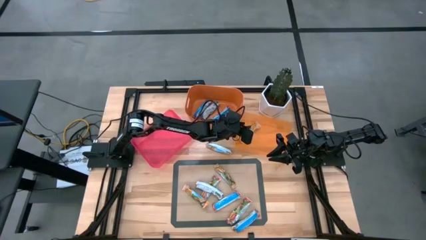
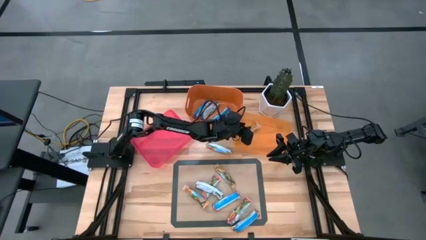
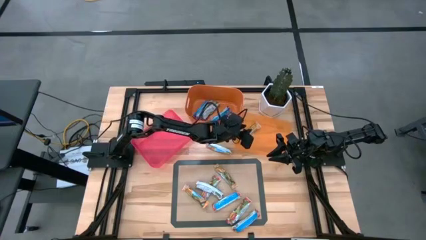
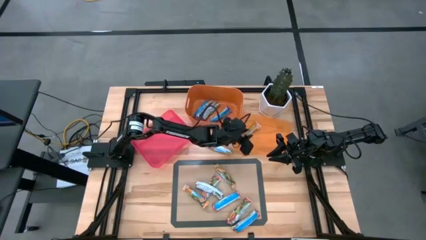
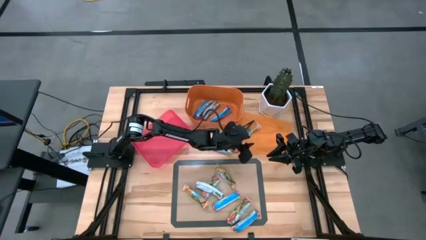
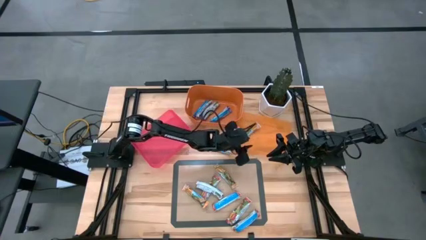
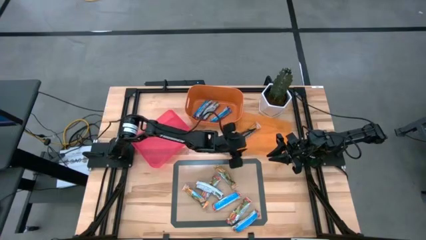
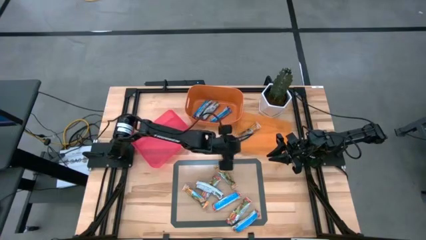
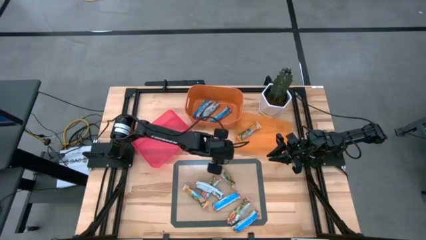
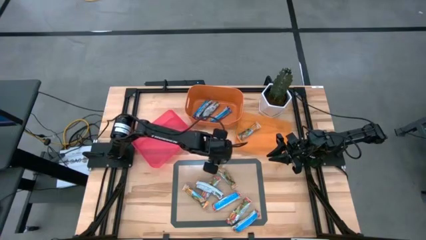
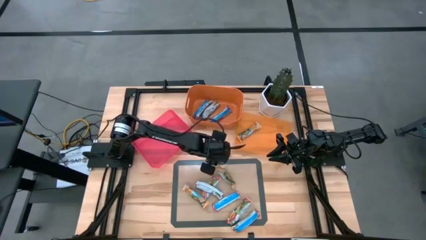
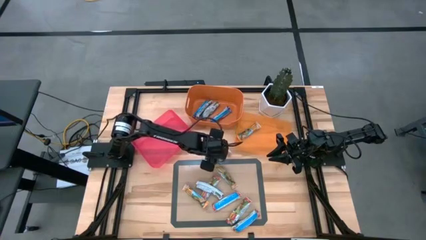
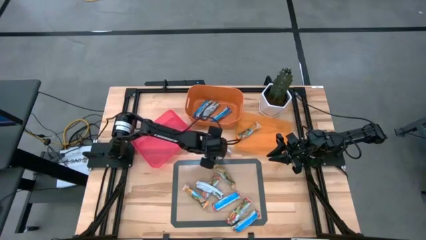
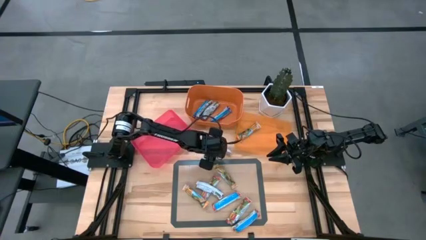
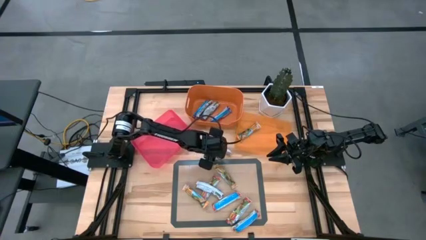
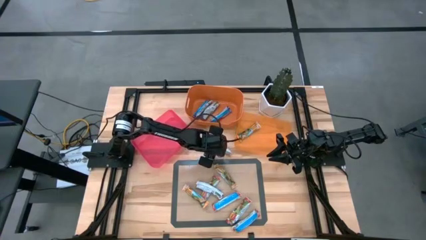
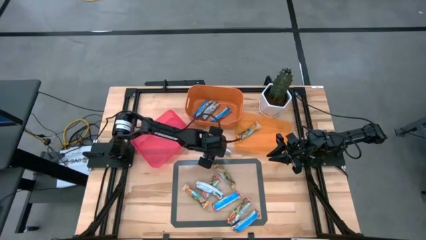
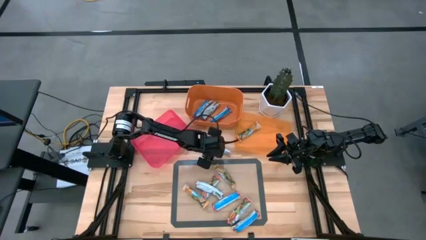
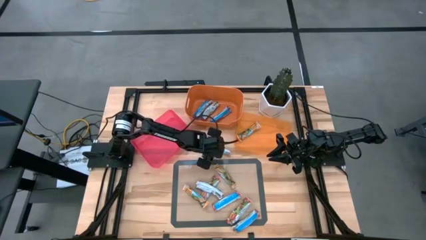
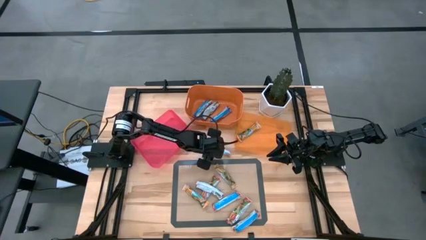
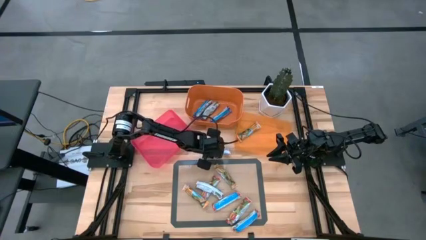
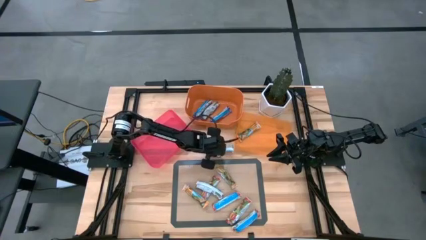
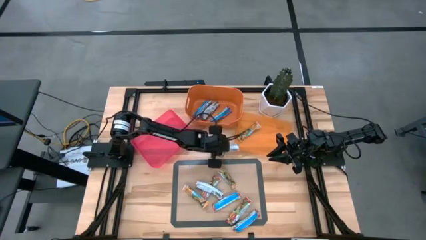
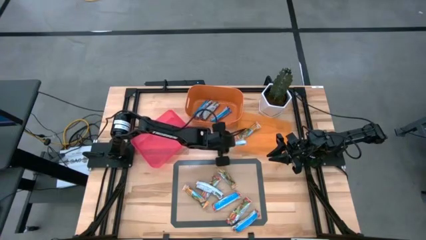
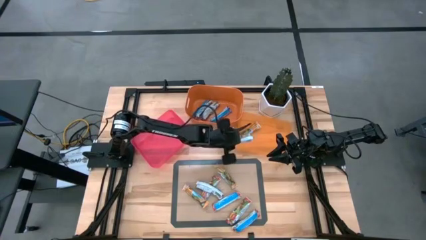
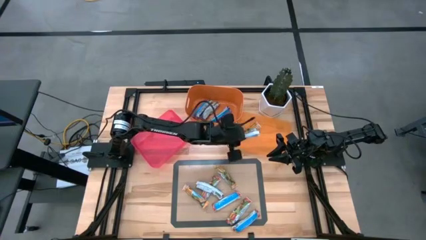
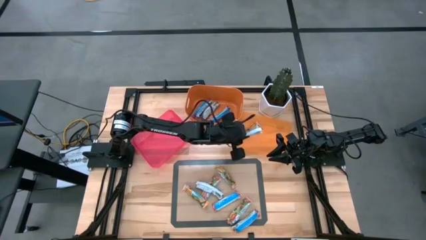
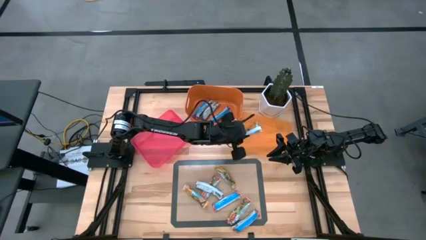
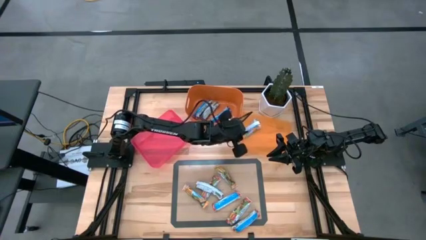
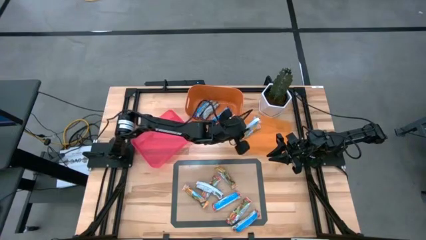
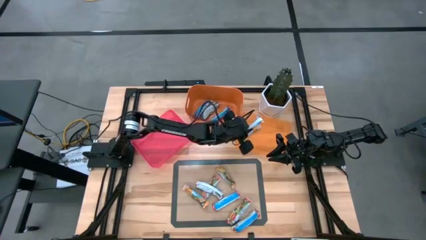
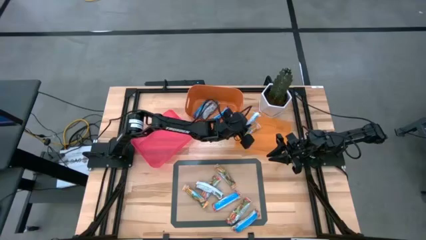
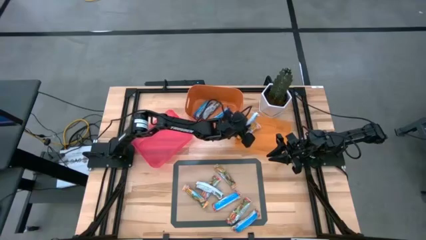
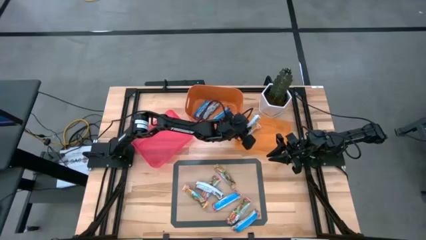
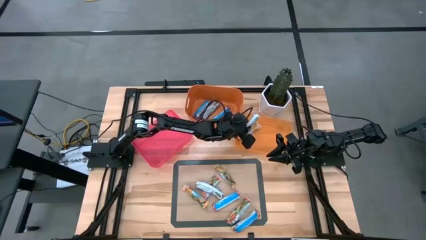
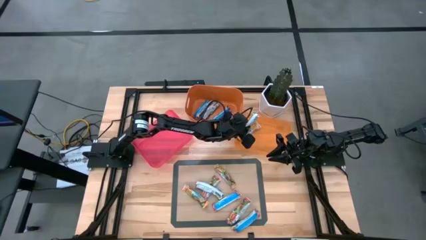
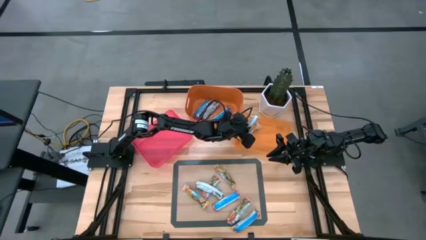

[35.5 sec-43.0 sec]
Task: Pick and place Granola Bars by type
Put the yellow granola bar into the light orange bin

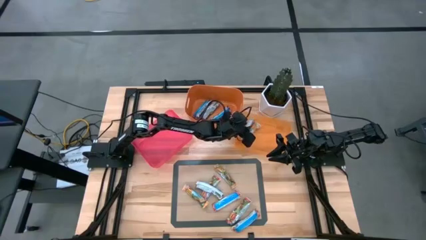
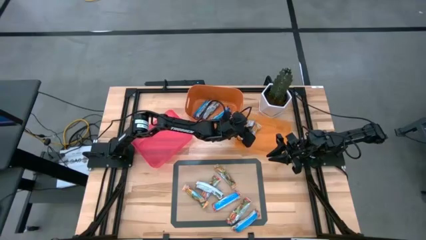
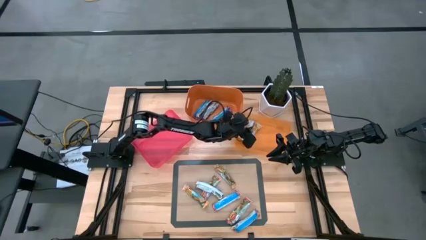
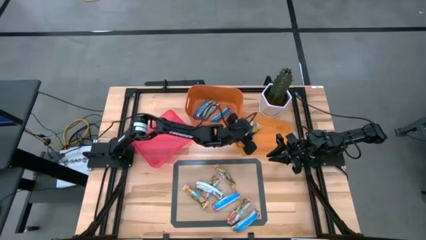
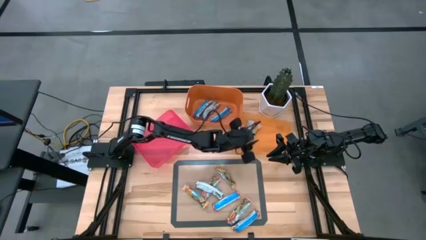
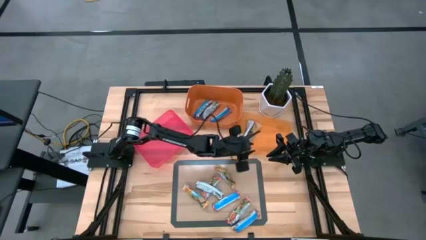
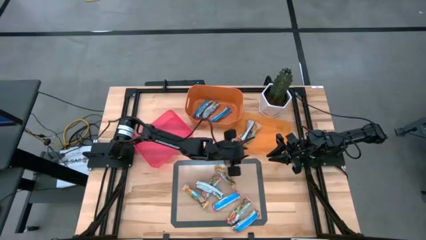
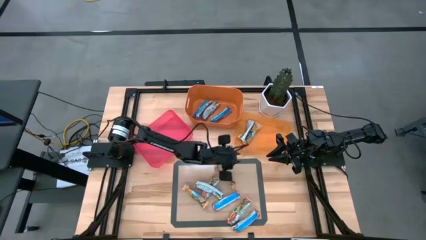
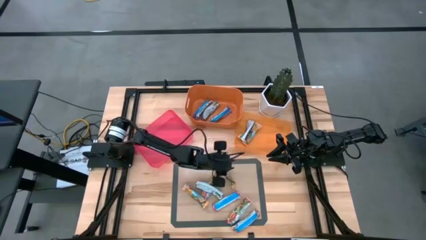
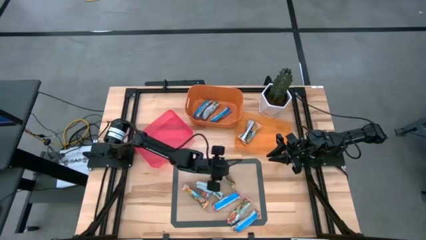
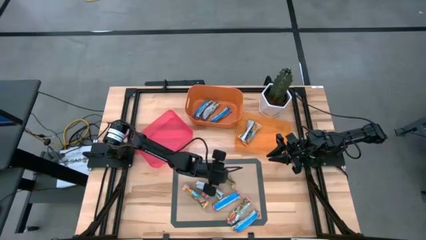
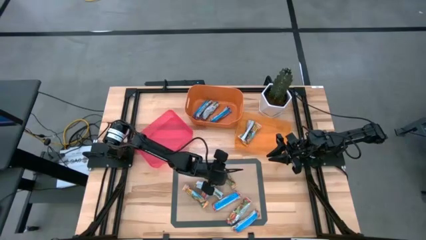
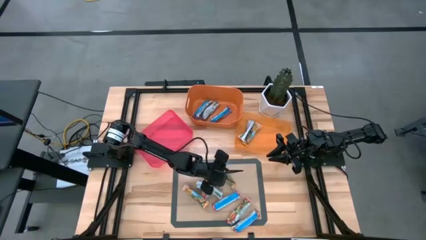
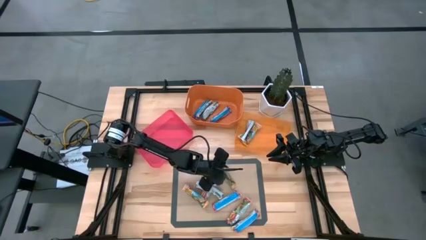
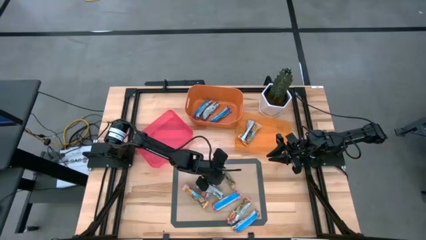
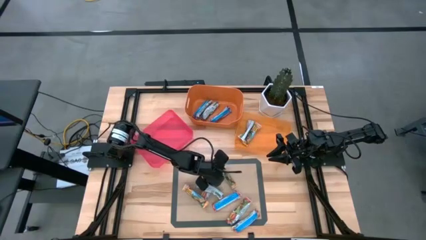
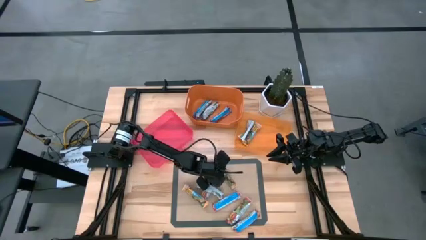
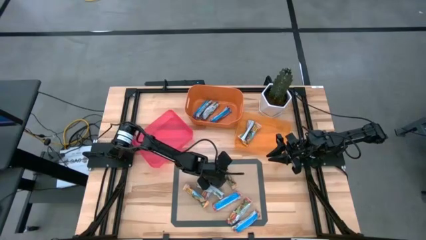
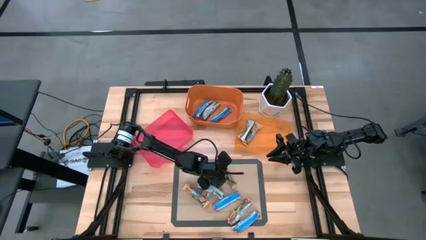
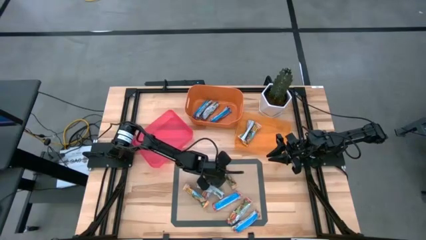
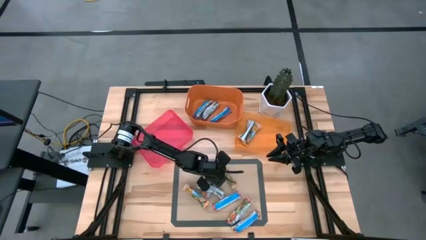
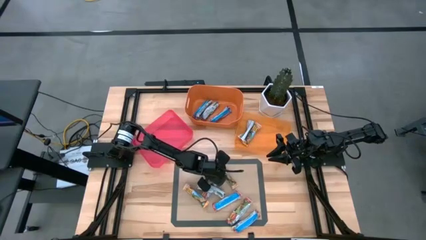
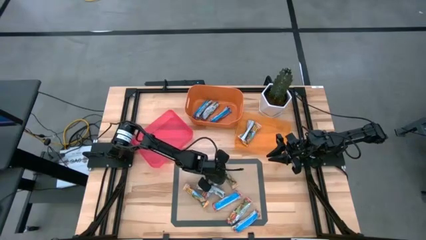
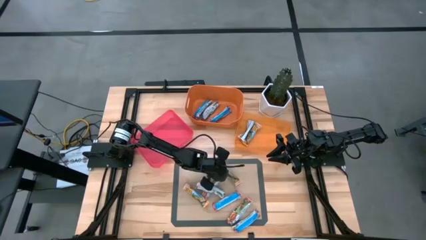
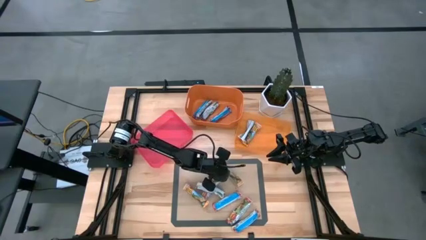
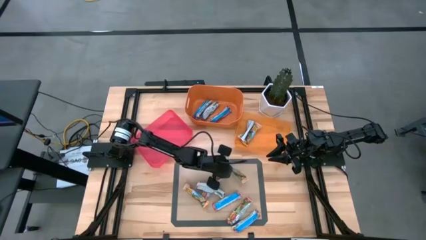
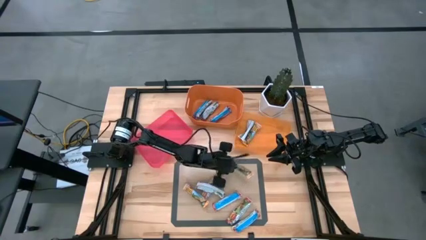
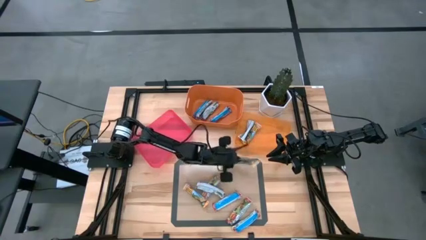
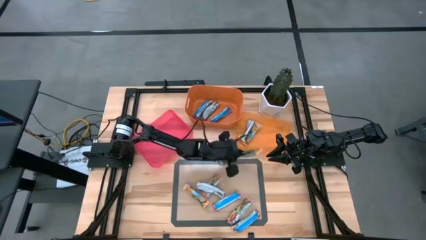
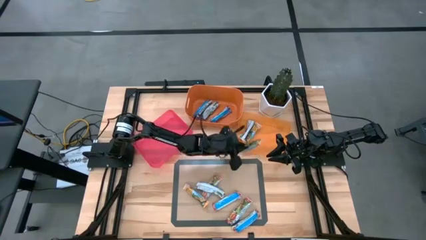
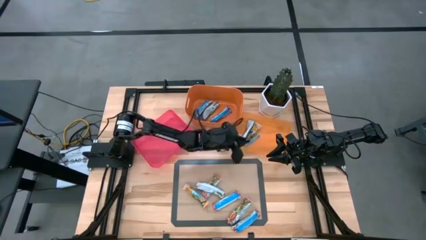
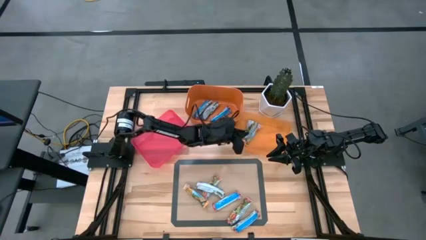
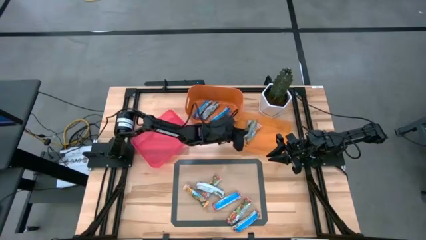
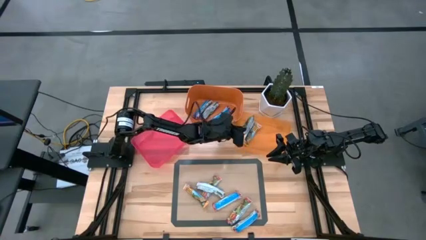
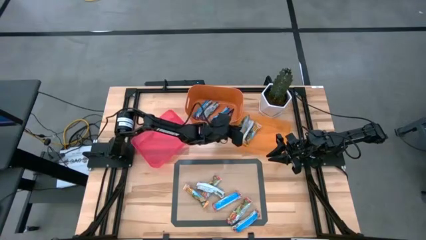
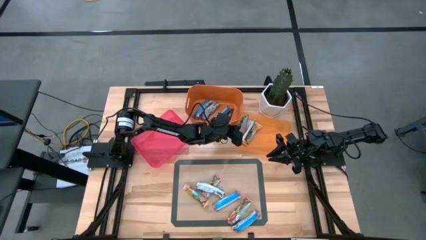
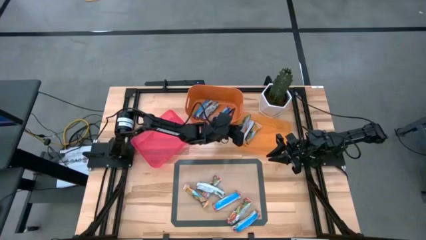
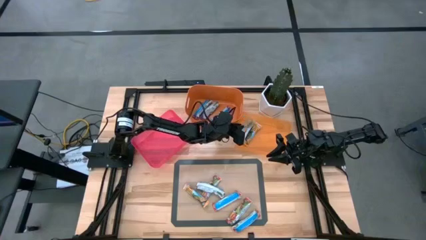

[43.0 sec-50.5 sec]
Put the top yellow granola bar into the light orange bin

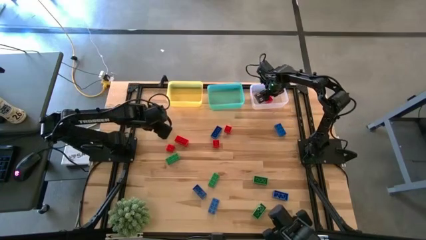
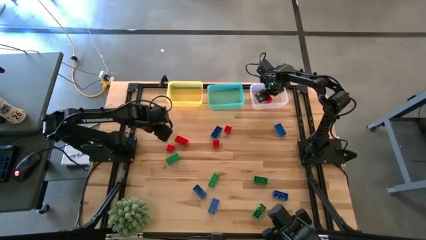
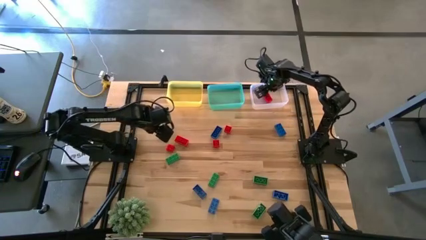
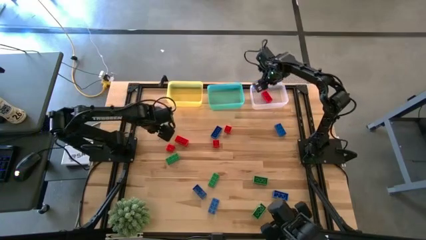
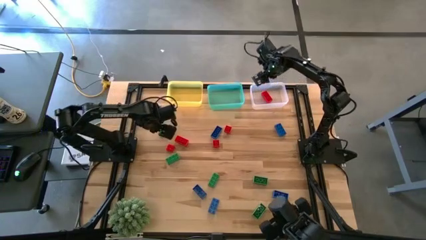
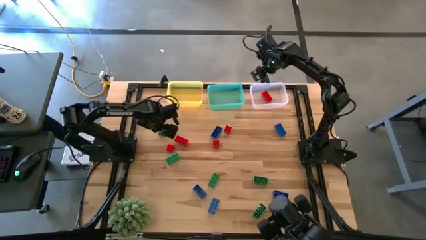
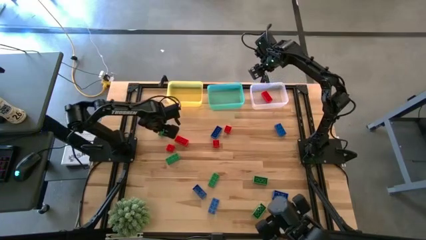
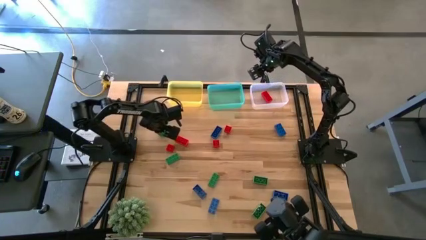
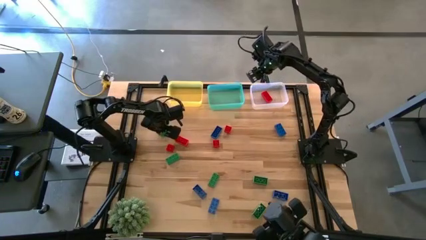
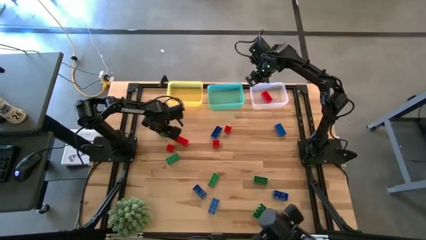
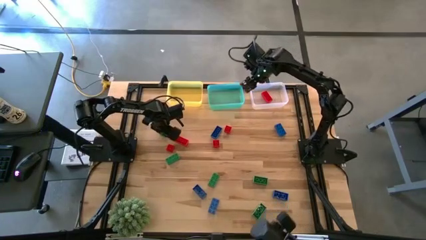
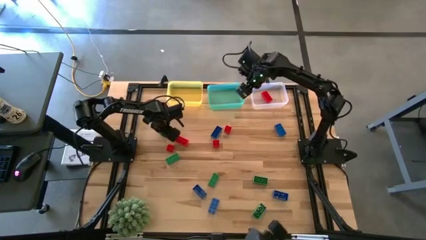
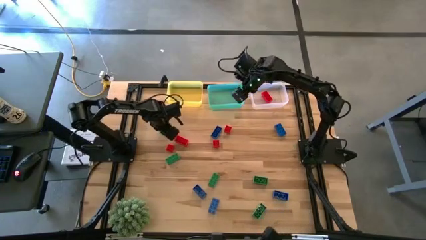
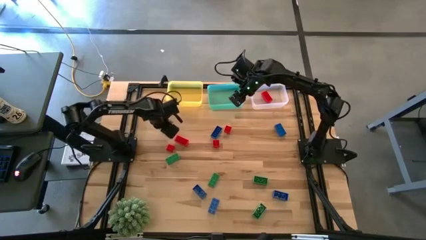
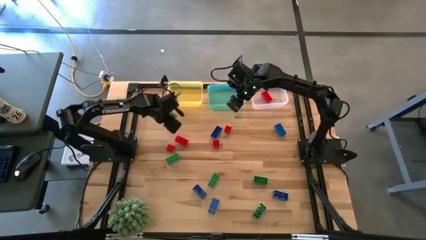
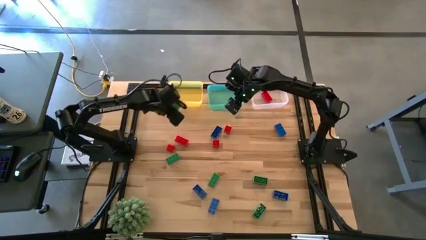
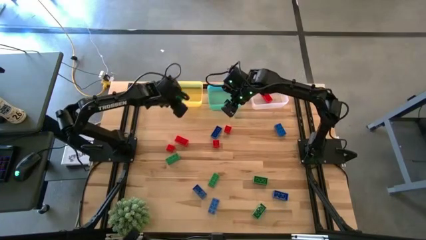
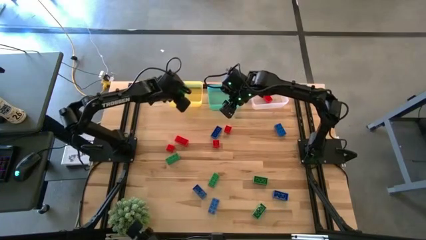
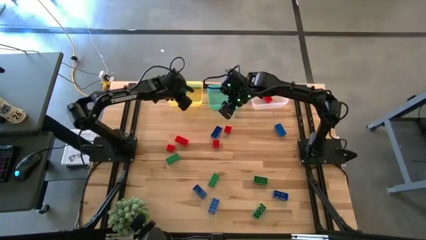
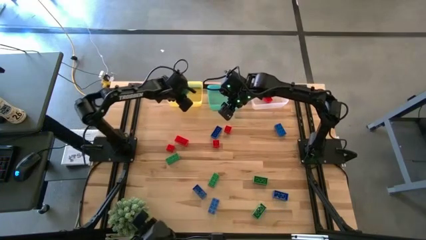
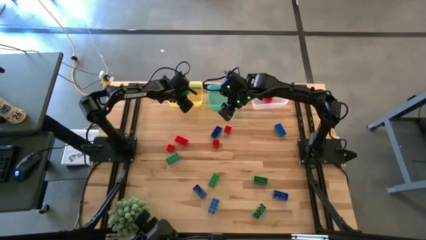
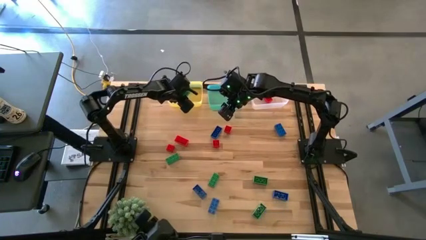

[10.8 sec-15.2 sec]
Task: Sort & place blocks by color
Put the green game piece into the yellow bin
